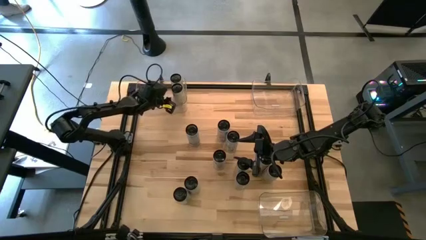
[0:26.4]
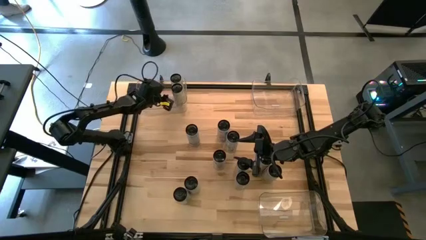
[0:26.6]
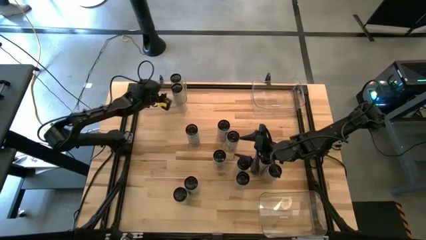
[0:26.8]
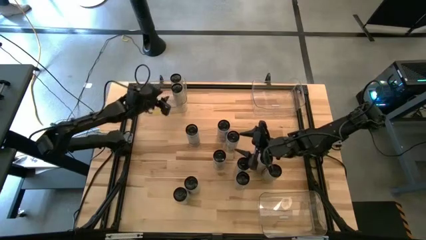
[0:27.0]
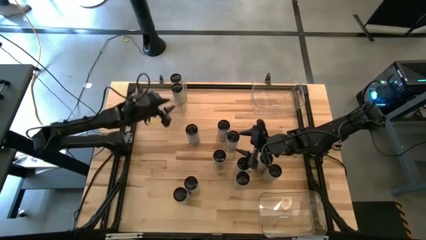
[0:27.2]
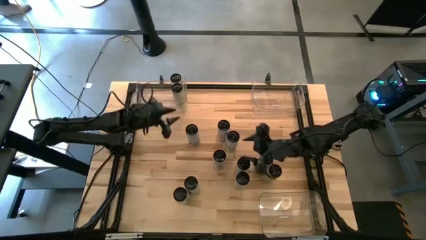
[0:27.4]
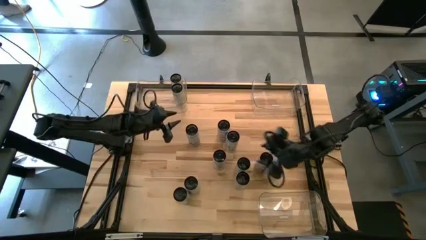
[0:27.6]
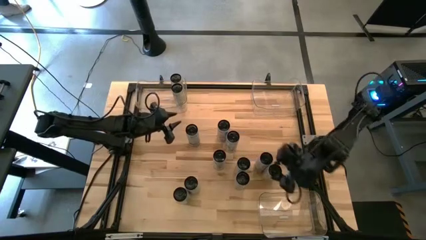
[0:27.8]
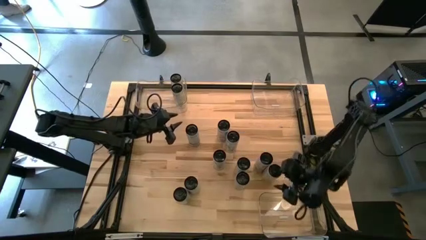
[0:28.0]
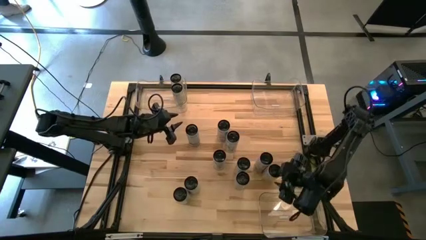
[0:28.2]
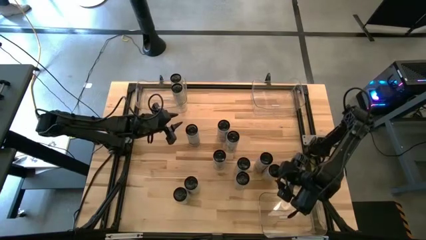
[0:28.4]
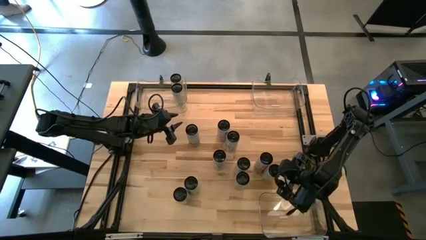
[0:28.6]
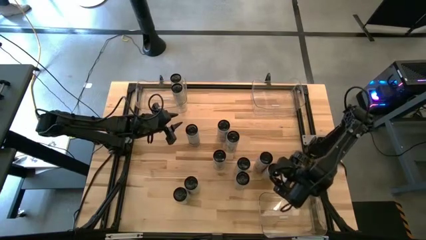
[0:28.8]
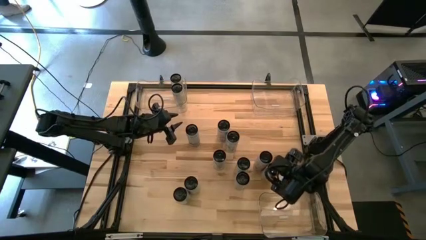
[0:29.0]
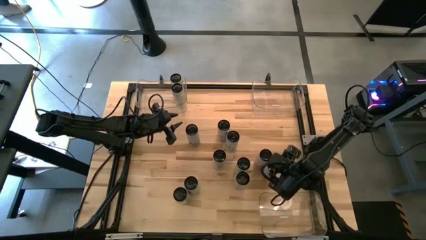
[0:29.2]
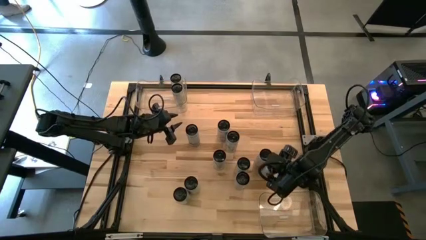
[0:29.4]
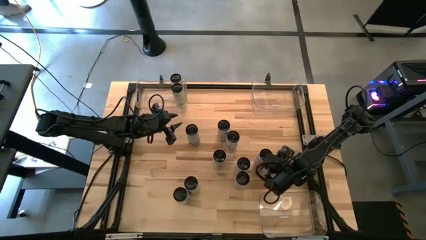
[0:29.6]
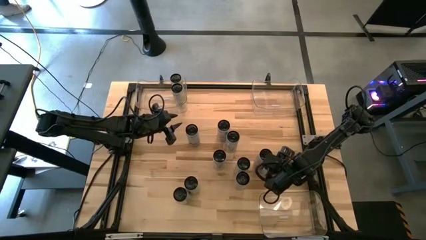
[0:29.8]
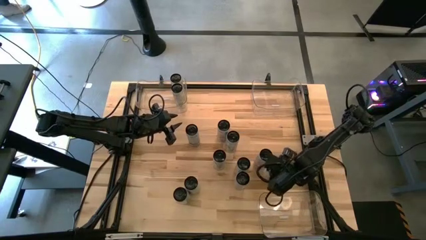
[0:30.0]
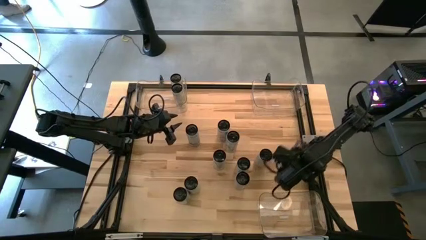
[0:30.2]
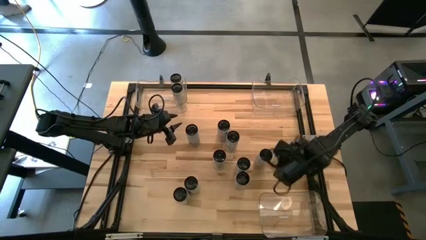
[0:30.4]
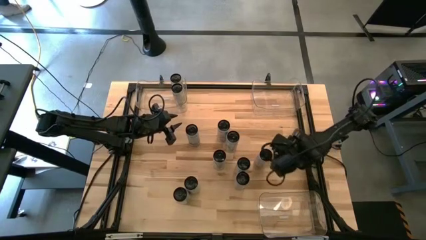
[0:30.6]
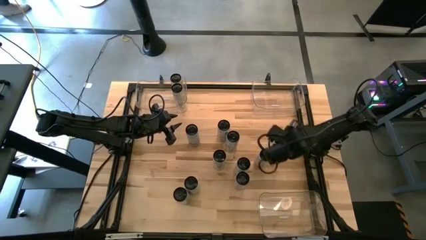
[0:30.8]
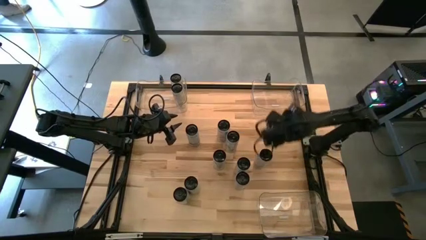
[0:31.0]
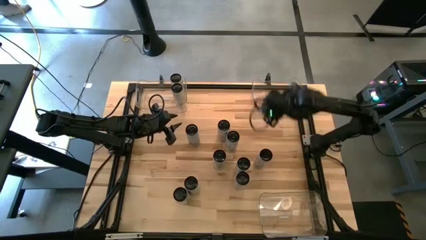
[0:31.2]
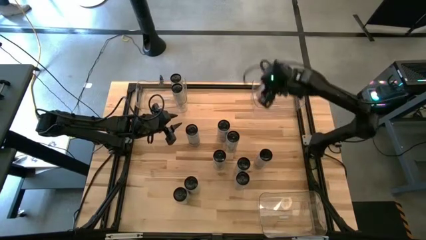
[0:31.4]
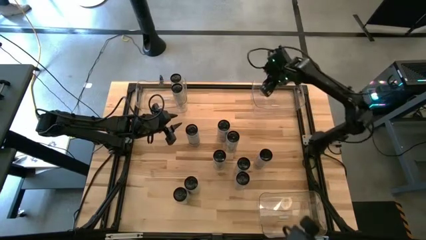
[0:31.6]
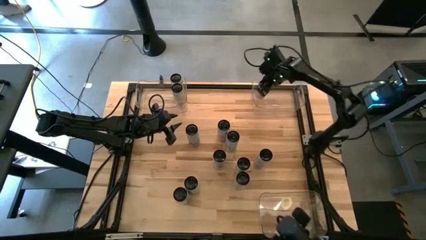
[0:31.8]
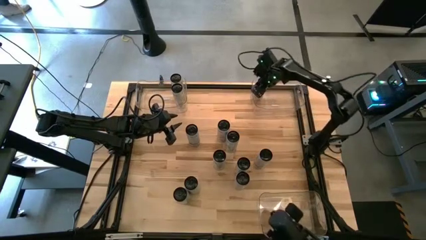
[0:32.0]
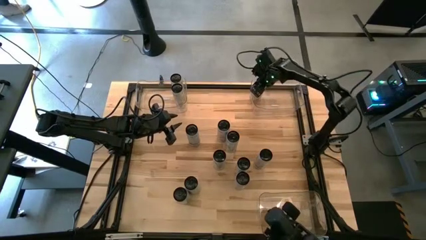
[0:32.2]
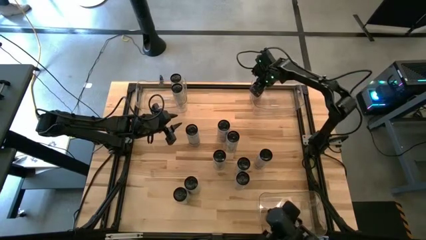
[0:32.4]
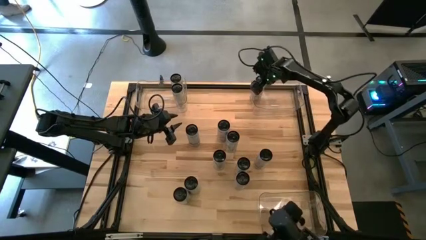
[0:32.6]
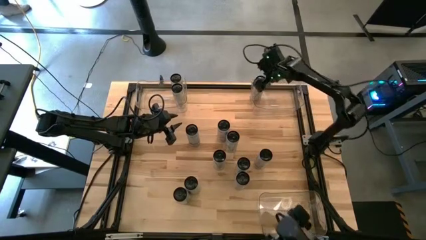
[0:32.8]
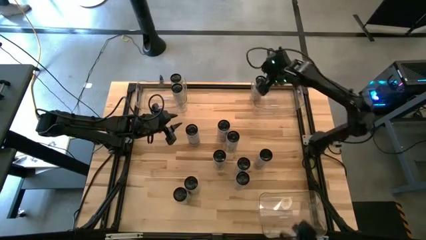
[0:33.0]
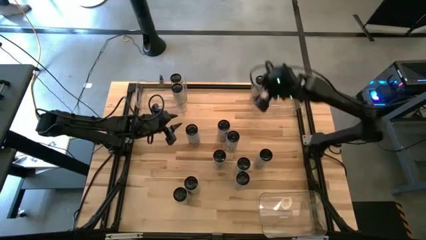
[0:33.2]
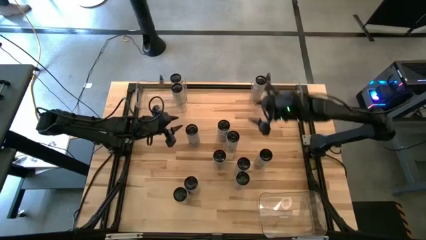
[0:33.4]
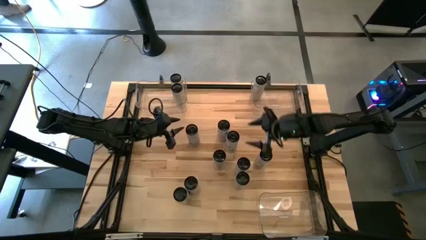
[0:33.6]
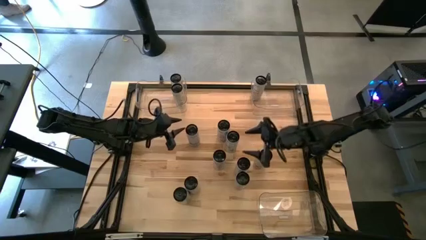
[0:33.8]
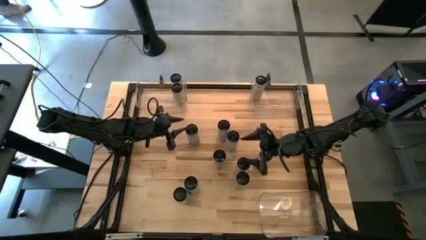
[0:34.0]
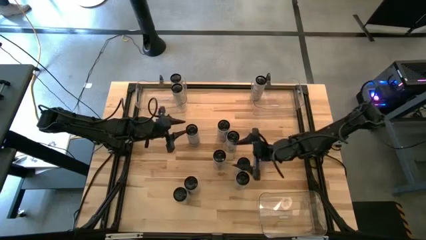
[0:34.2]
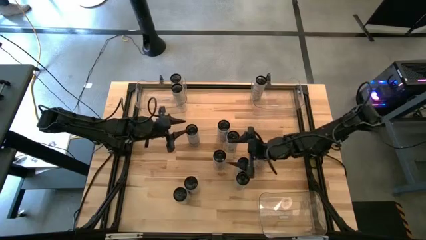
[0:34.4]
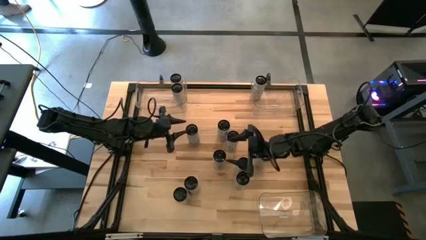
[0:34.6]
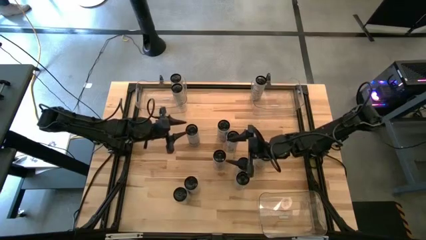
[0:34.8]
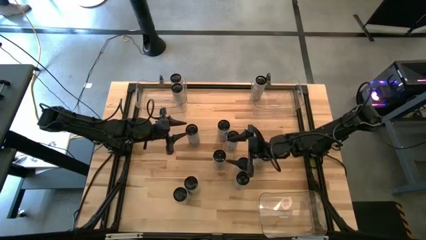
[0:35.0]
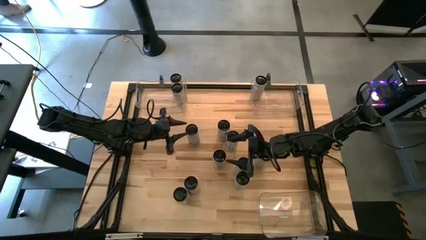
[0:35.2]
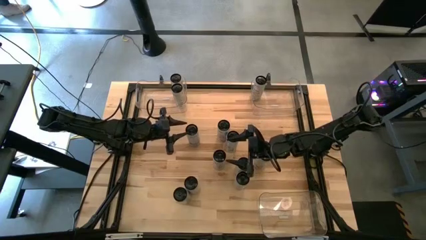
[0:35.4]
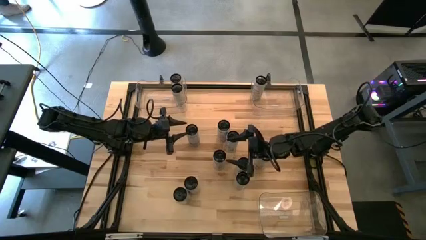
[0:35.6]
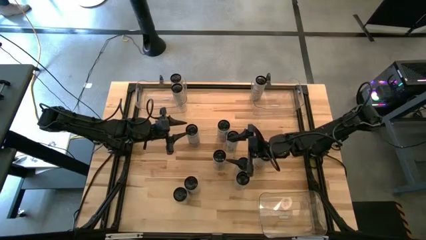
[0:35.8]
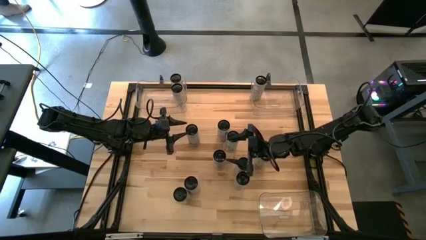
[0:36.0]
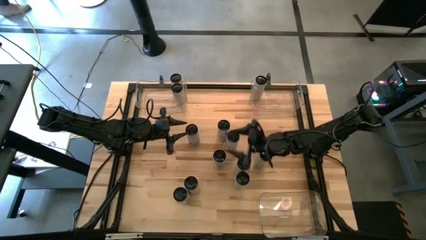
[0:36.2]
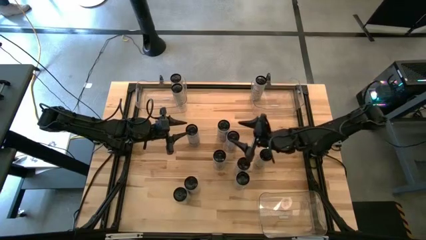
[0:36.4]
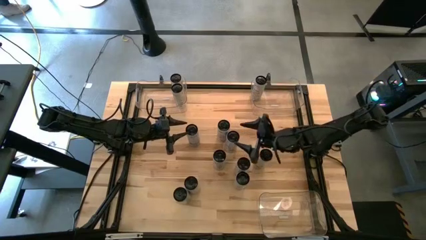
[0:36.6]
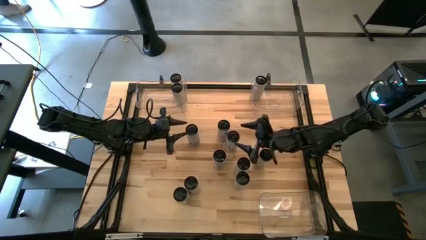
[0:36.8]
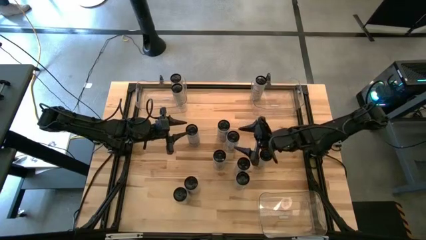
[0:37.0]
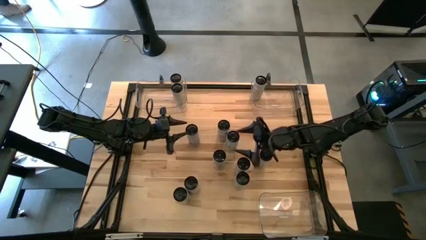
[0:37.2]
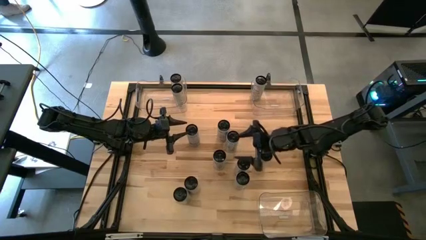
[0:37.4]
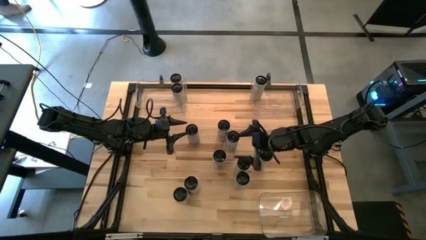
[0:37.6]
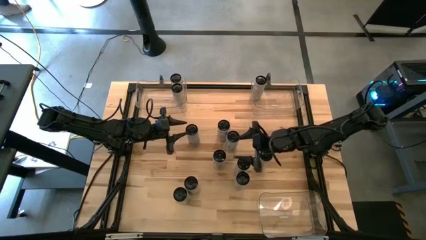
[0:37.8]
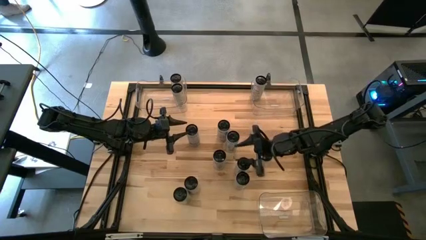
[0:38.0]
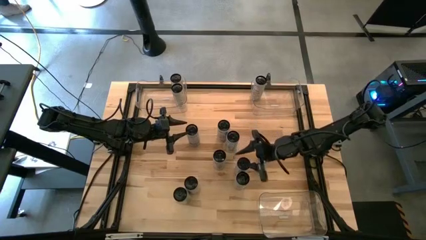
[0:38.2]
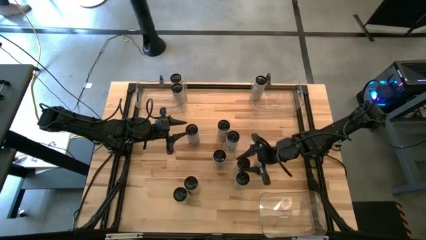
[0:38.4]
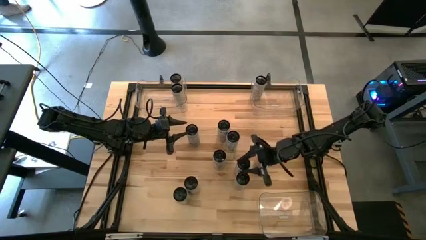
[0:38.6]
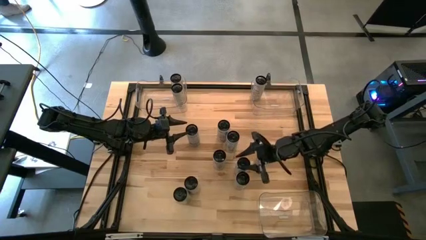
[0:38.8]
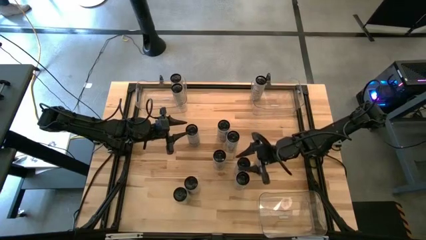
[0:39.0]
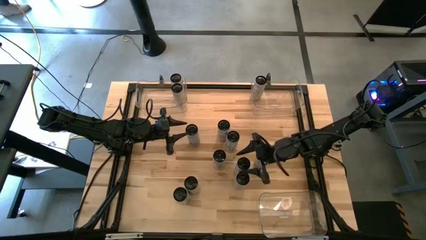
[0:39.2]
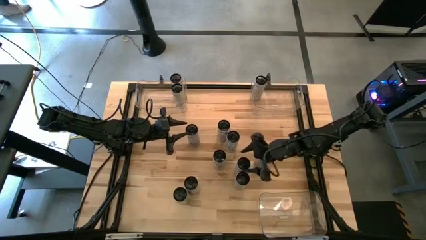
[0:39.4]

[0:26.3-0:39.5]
Task: Sort soda cans
Put the white-yellow soda cans into the top left transparent bin
